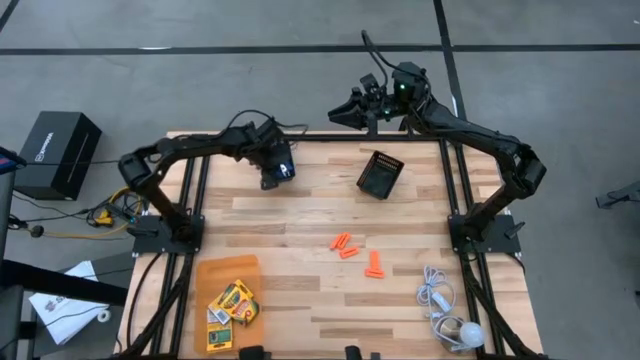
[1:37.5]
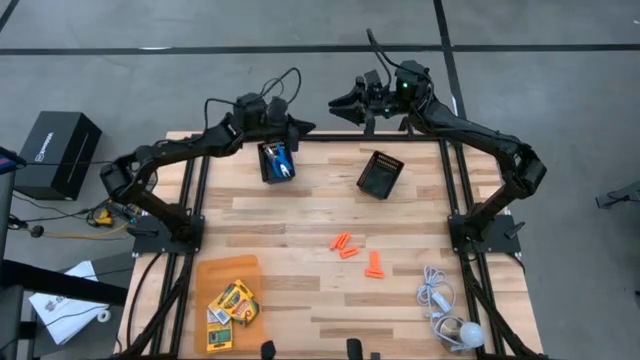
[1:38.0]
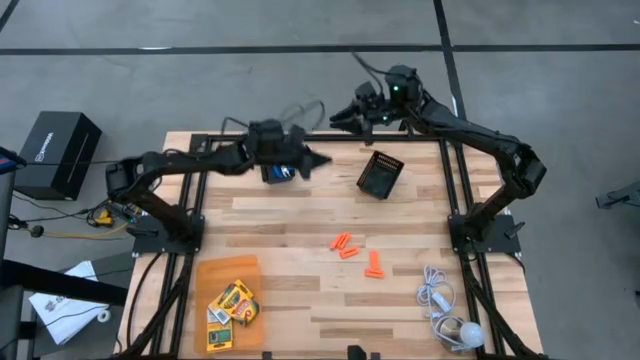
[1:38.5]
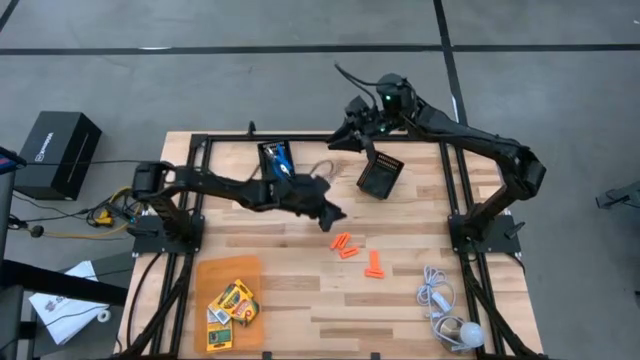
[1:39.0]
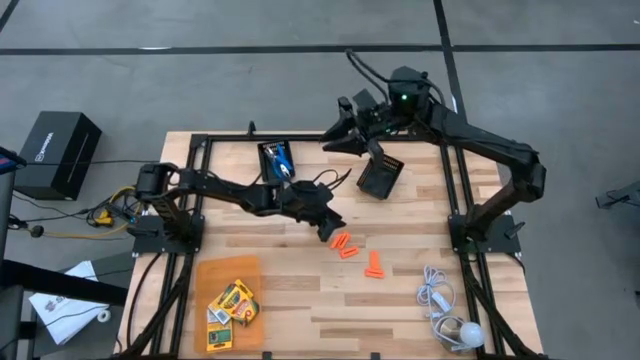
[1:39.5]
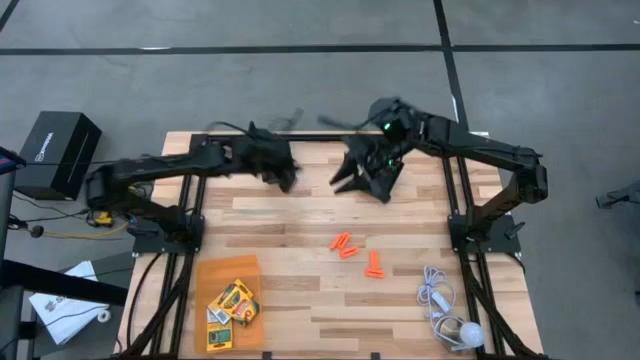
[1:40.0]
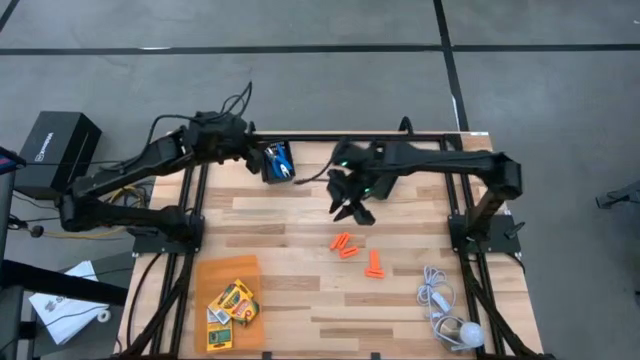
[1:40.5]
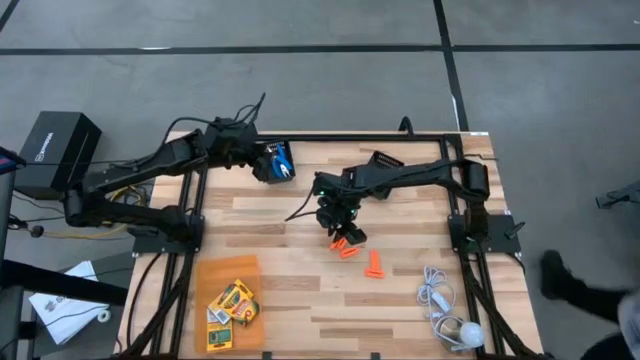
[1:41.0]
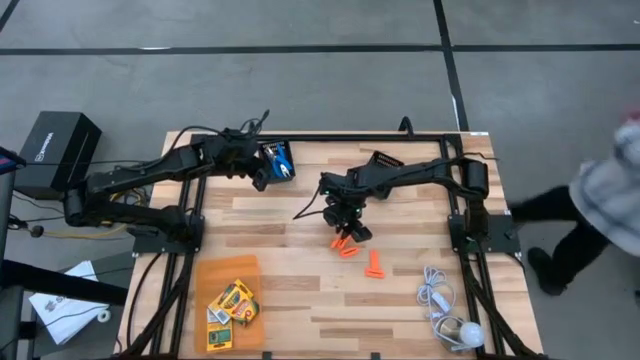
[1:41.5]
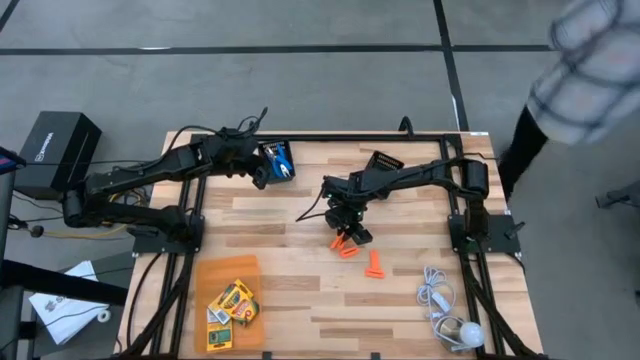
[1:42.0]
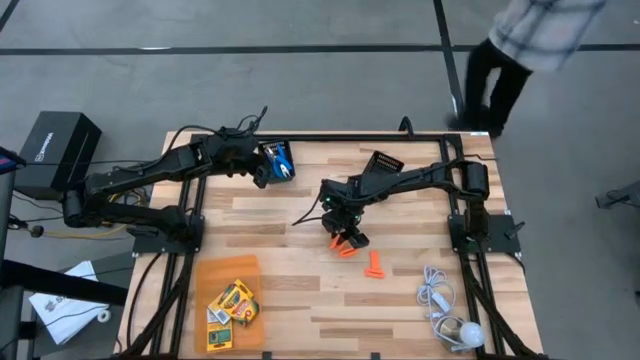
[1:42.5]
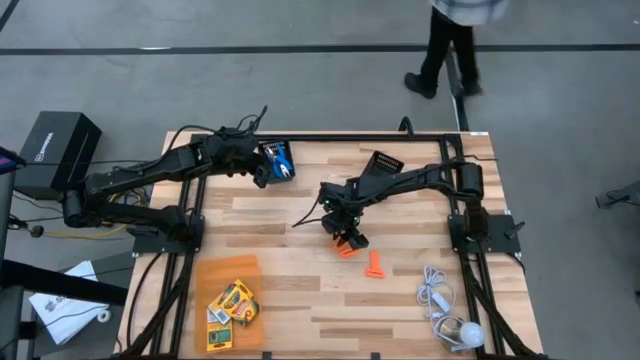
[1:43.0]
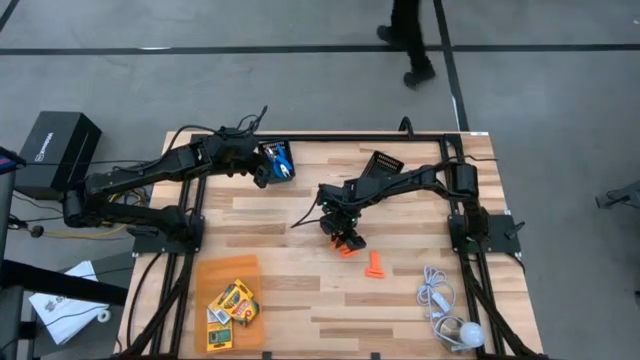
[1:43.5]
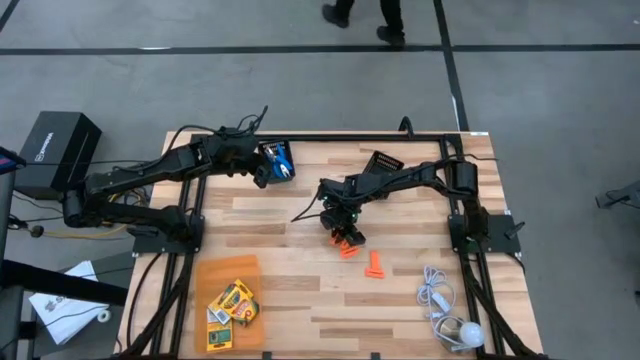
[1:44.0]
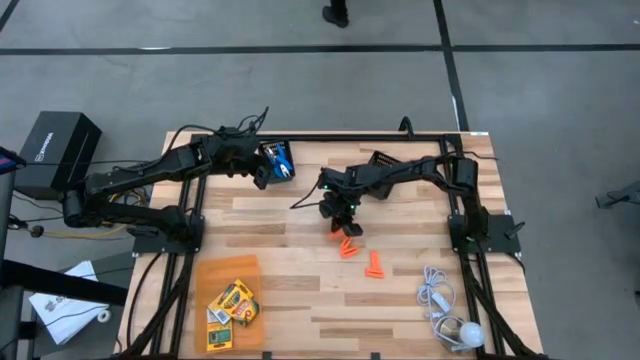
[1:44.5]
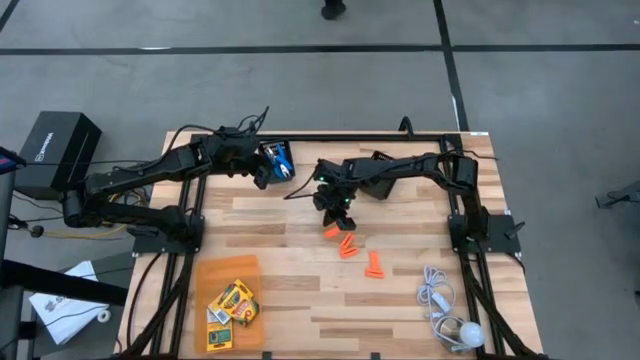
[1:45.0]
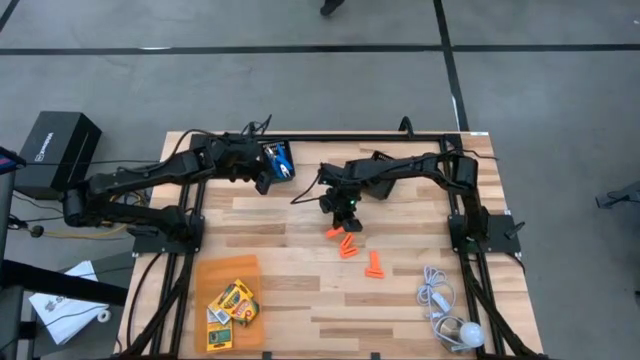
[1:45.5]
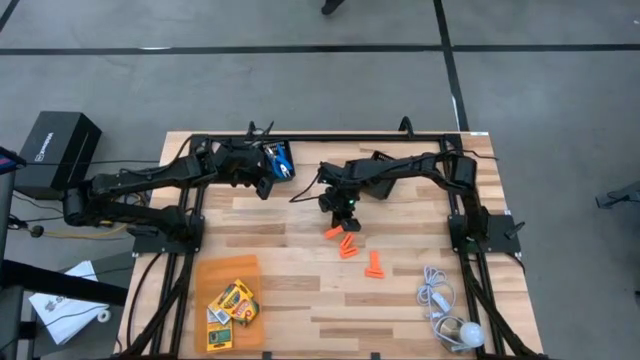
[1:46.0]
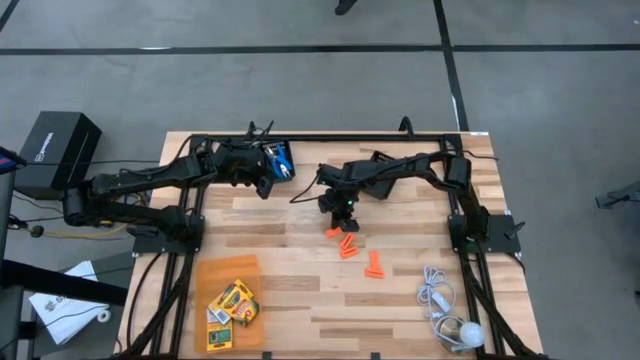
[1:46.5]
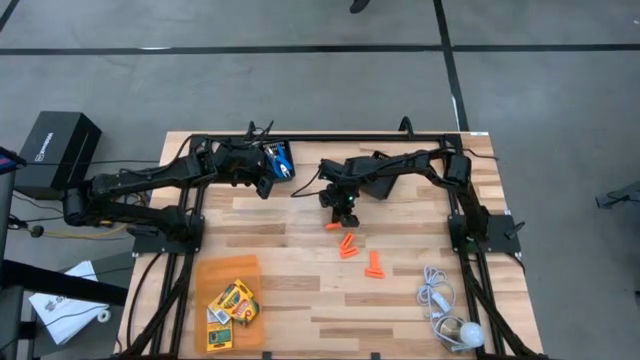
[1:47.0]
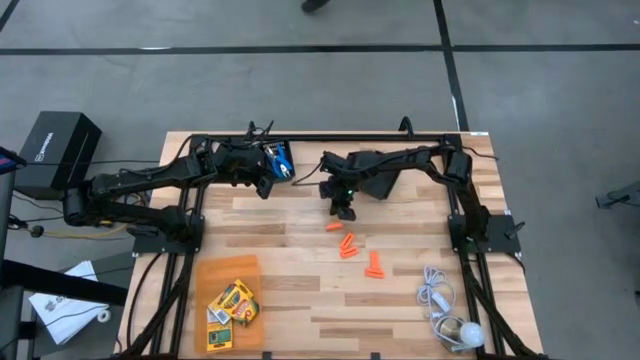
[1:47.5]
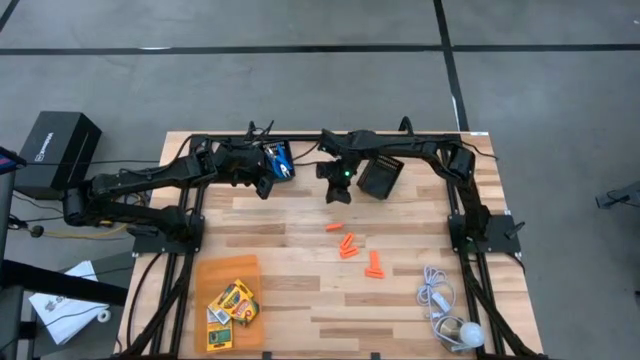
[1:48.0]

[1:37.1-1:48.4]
Task: Pick & Place School Supplies
Put the orange eraser into the right black bin

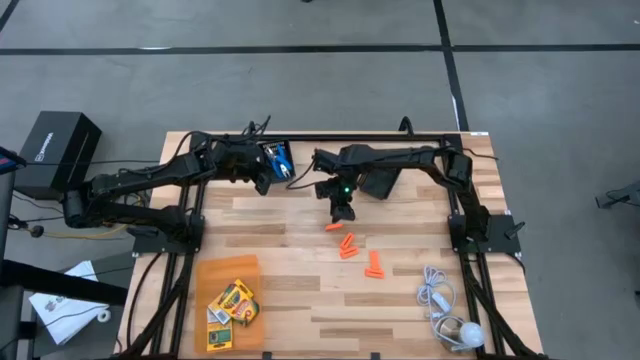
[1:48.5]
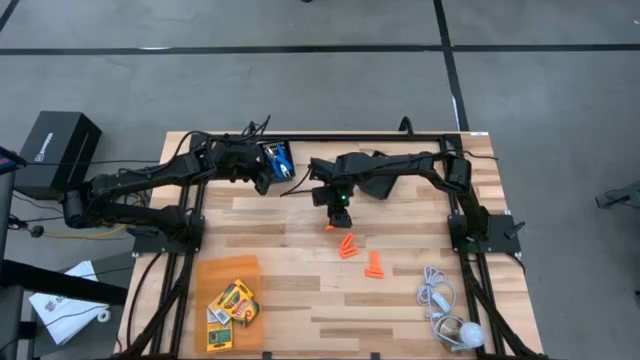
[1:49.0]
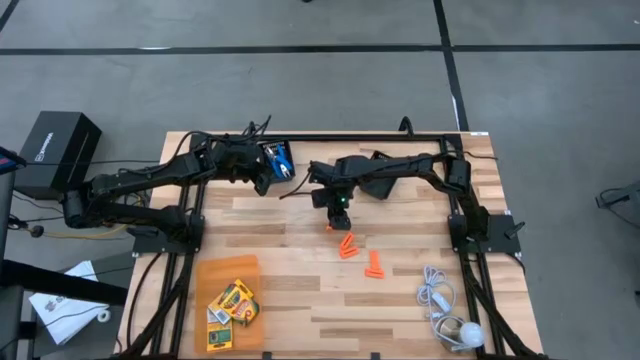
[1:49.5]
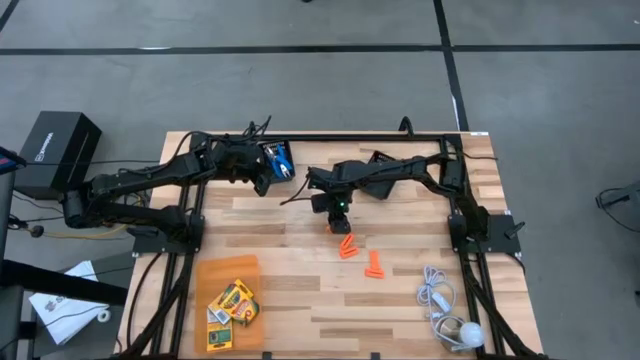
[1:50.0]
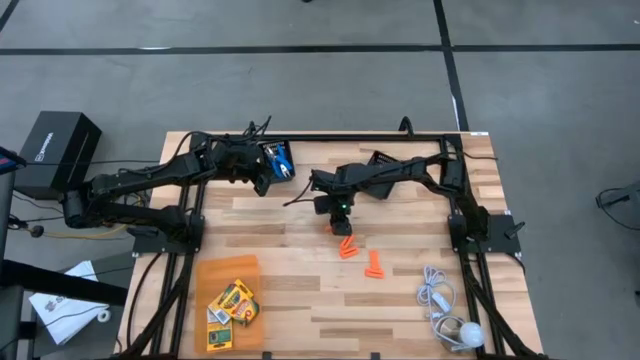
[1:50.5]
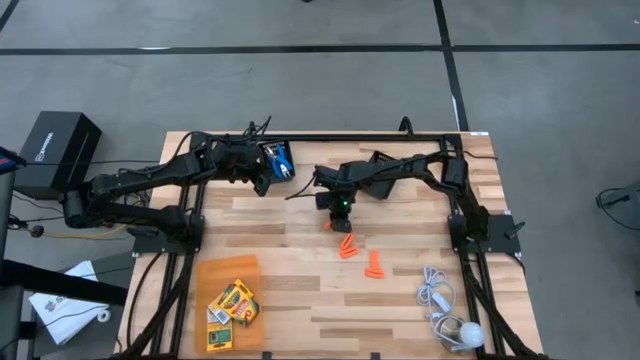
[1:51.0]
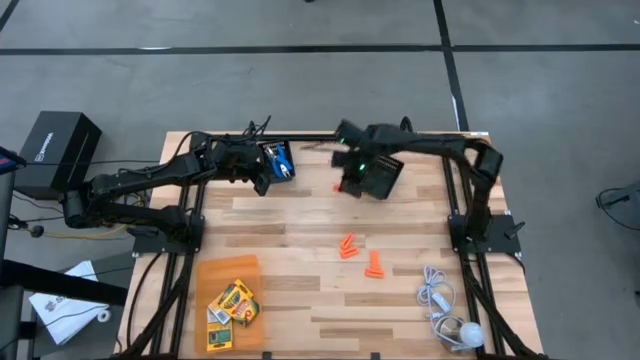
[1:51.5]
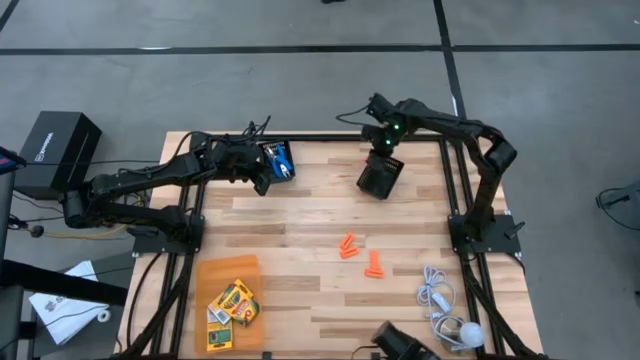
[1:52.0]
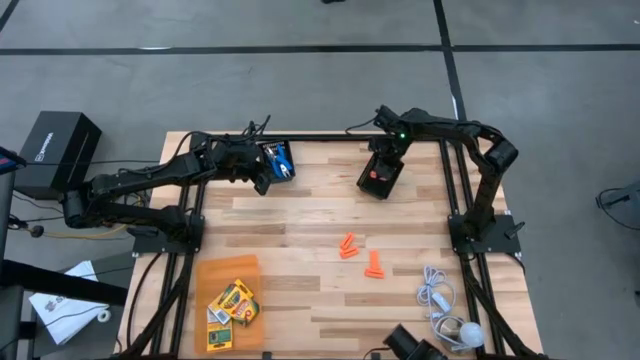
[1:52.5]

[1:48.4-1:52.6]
Put the orange eraser into the right black bin

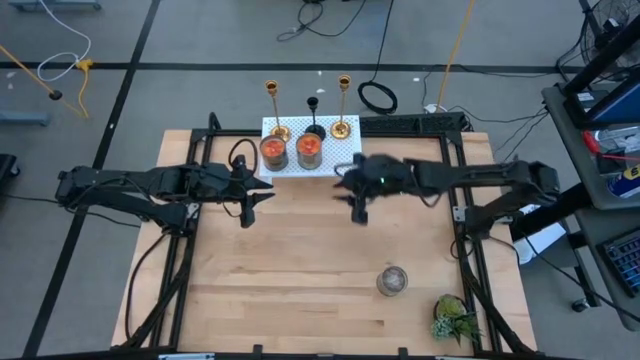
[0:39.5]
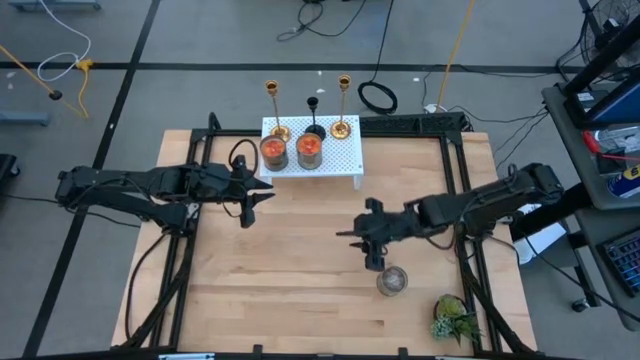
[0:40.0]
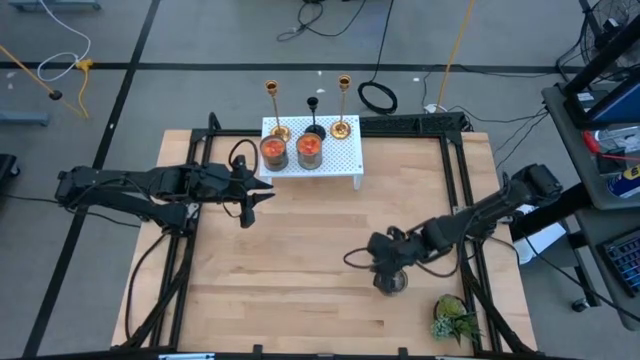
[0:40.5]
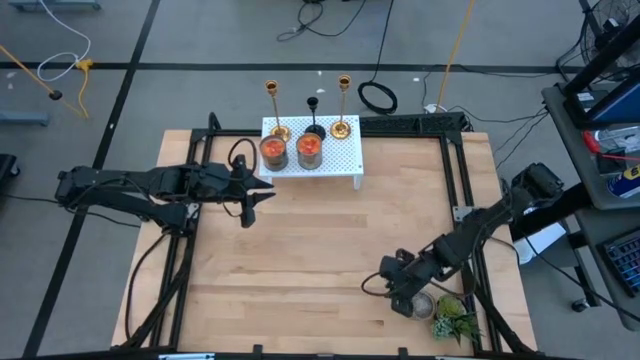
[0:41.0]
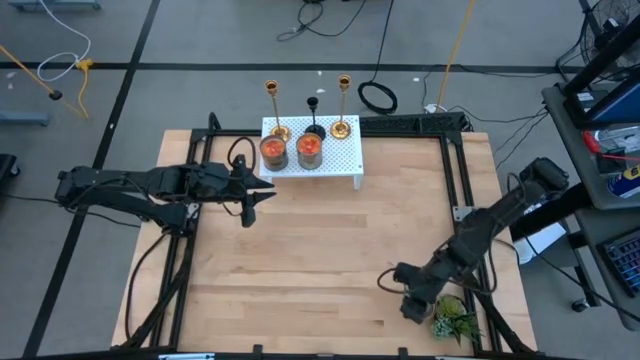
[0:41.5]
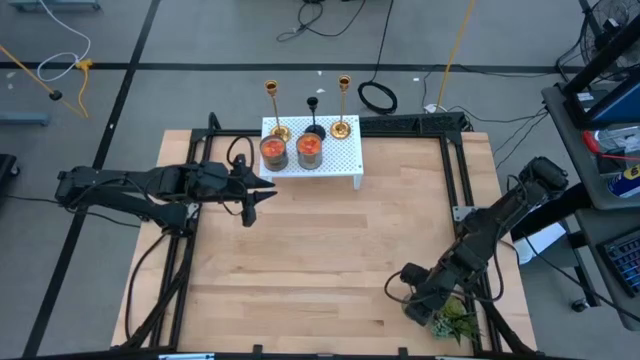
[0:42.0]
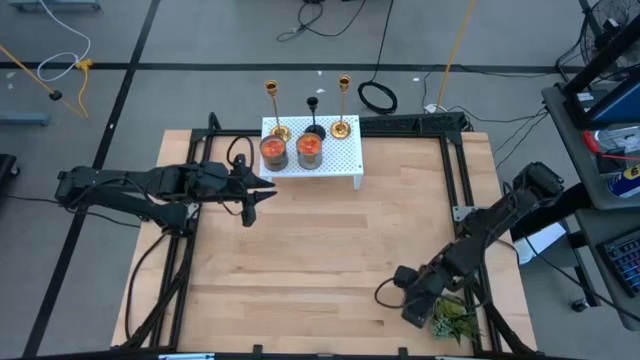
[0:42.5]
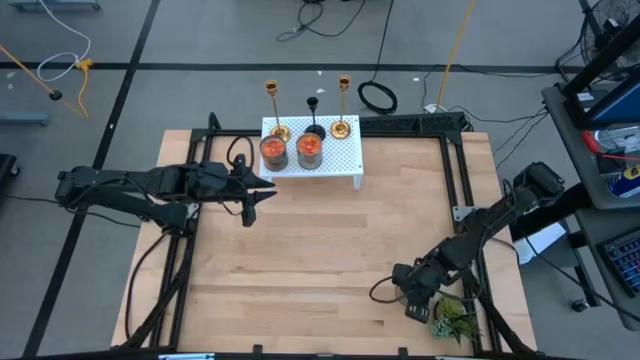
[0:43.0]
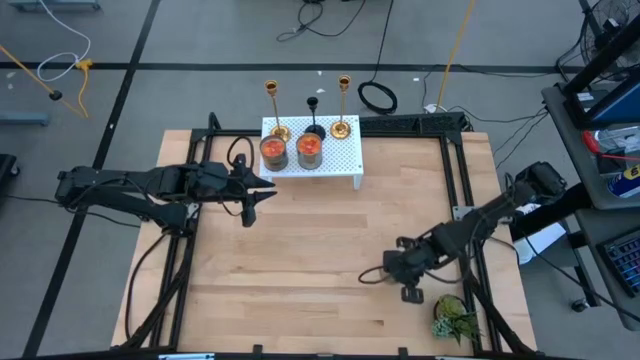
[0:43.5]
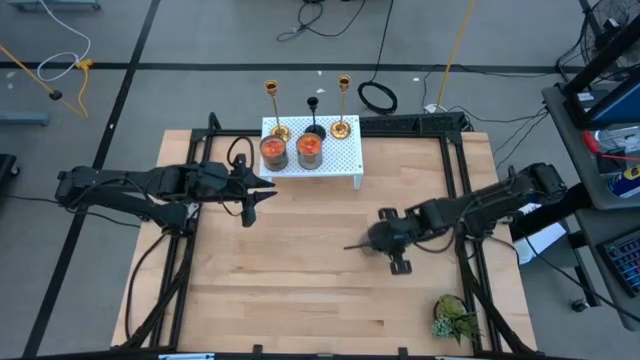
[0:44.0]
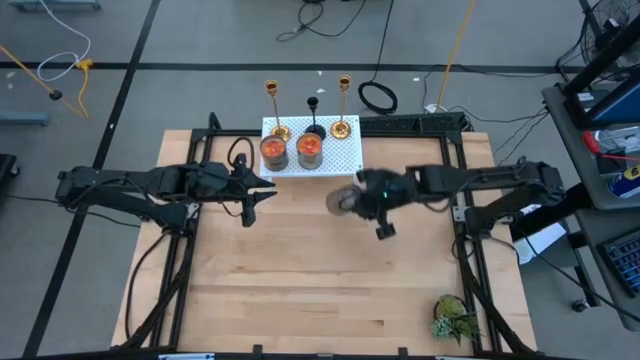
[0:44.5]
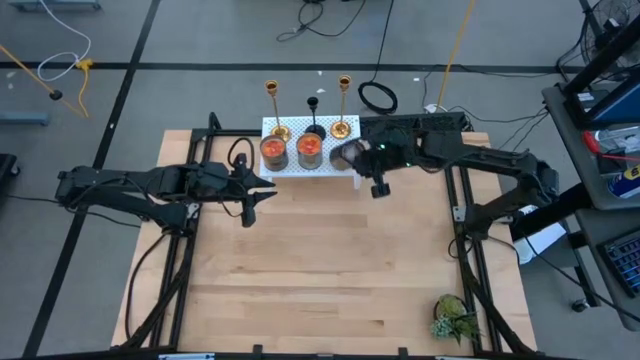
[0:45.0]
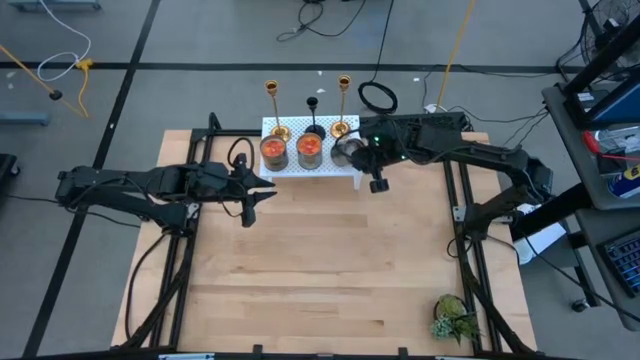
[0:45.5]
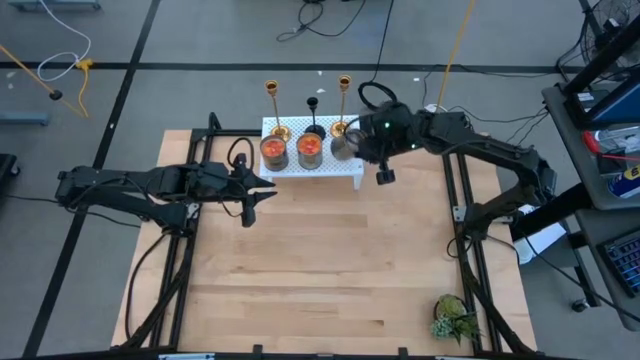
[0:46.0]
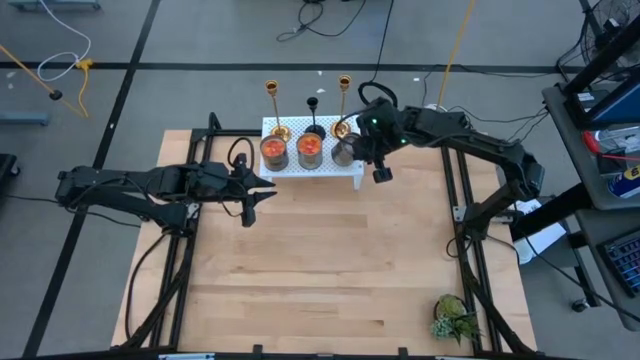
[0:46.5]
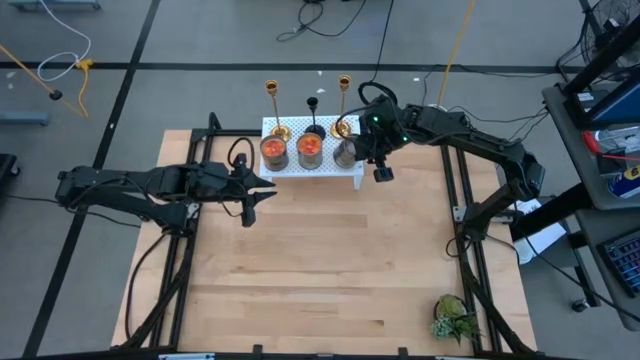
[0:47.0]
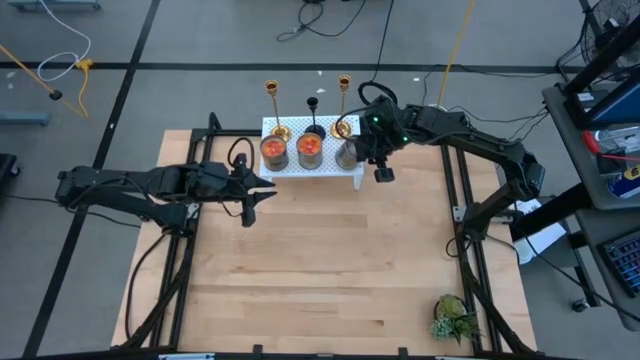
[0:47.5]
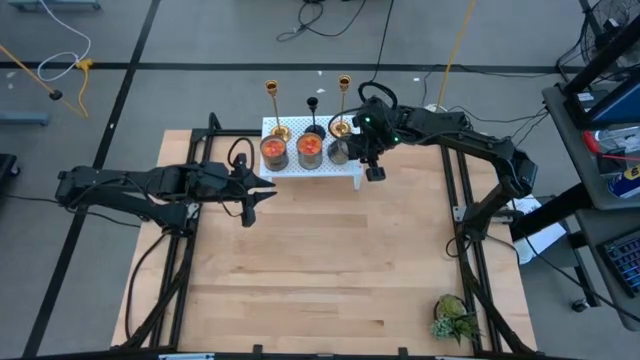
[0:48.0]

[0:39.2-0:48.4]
Task: Pick & Place candle stick holders
Put the brown candle on the shelf
